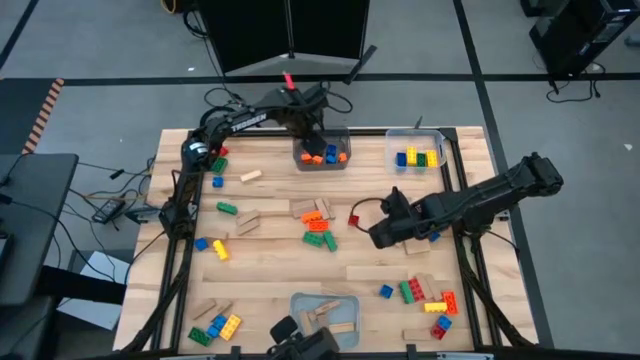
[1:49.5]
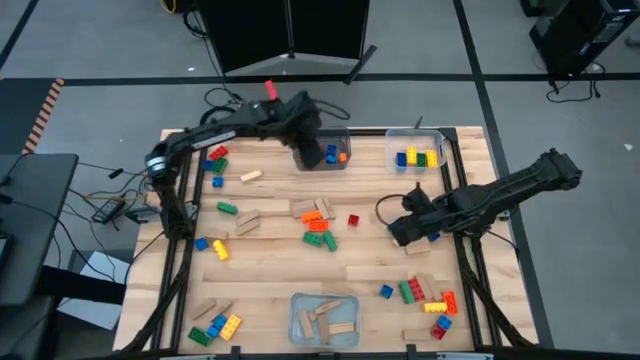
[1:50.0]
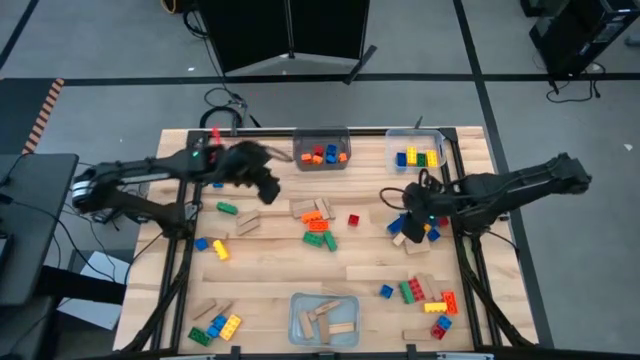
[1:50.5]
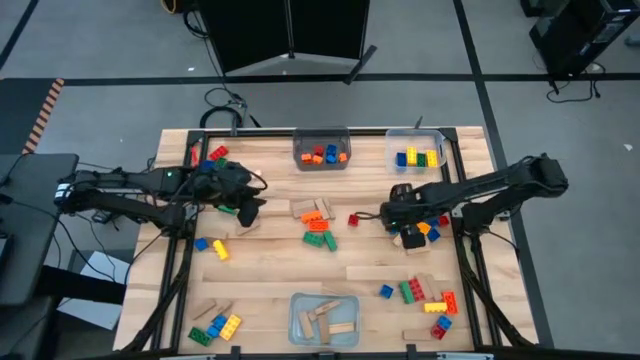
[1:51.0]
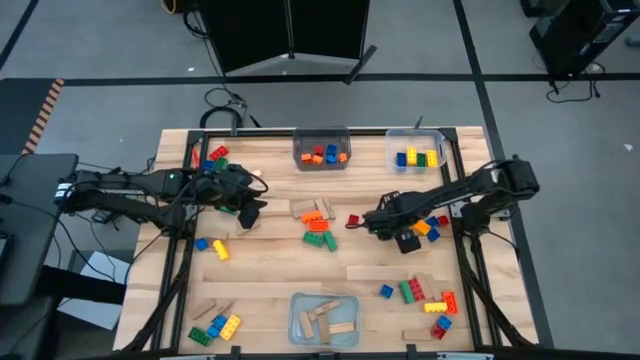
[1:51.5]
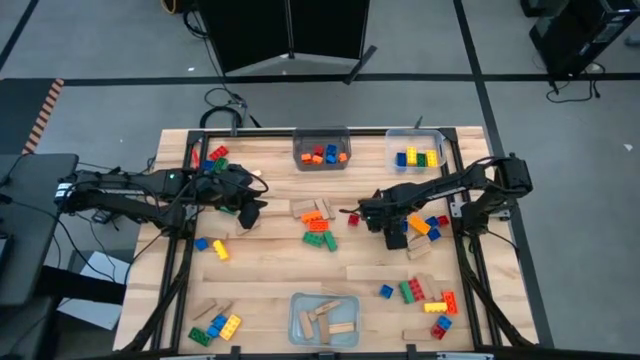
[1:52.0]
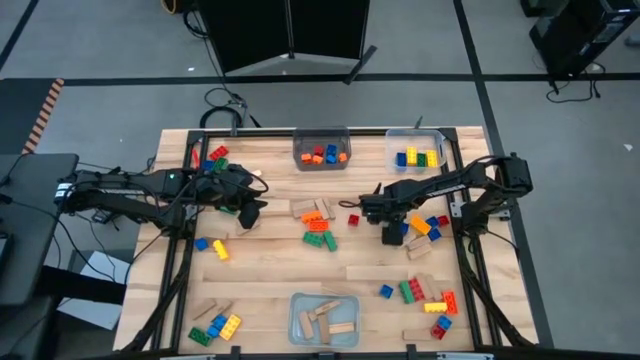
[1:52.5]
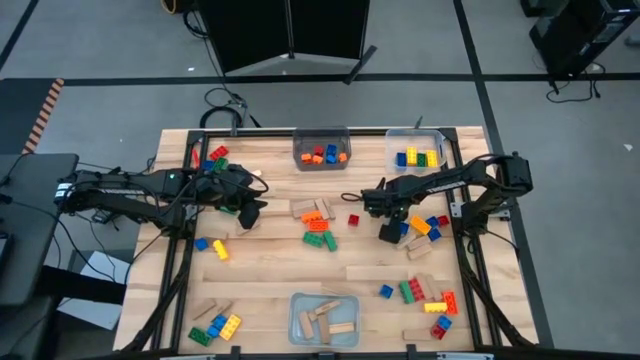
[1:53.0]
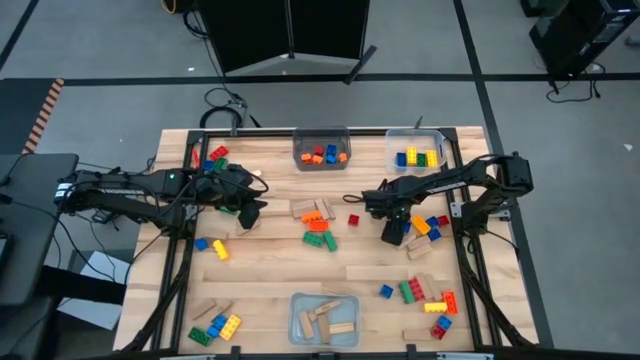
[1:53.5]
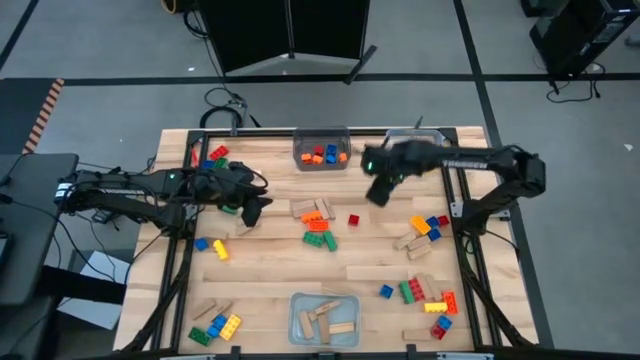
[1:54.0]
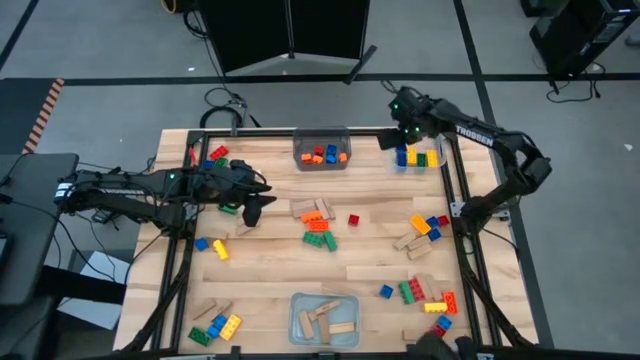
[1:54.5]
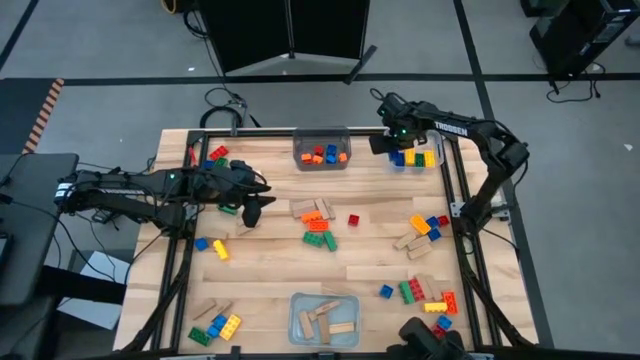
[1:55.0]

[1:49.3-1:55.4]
Task: Sort blocks by size
Put the large blue game piece into the transparent bin

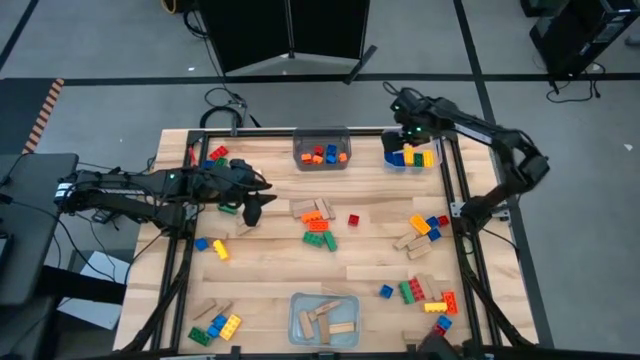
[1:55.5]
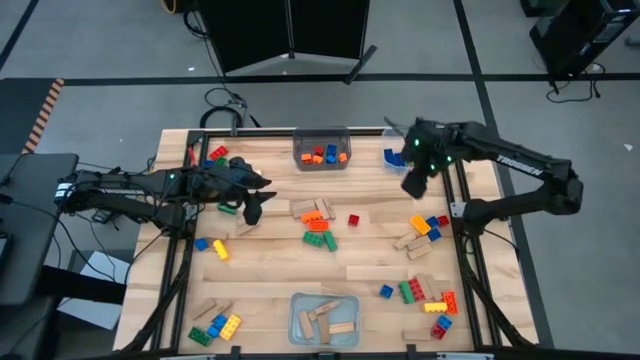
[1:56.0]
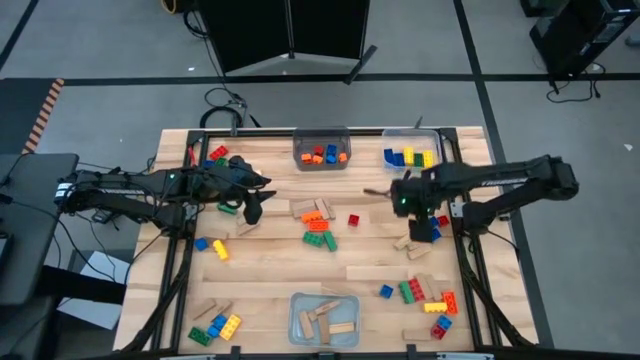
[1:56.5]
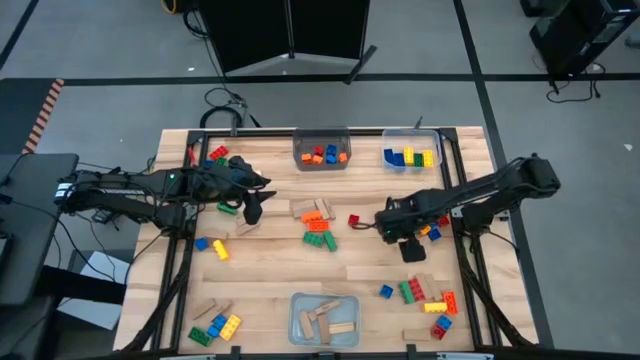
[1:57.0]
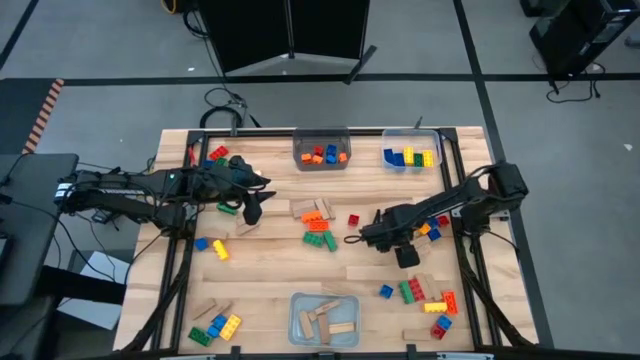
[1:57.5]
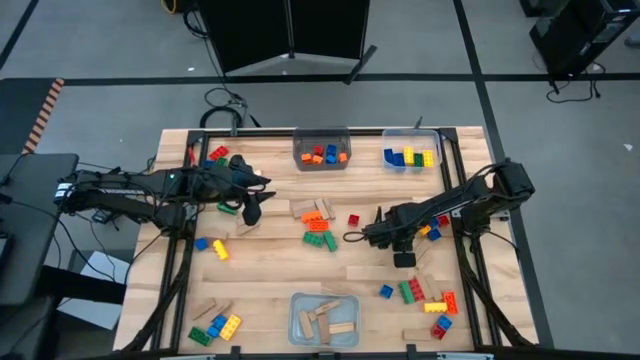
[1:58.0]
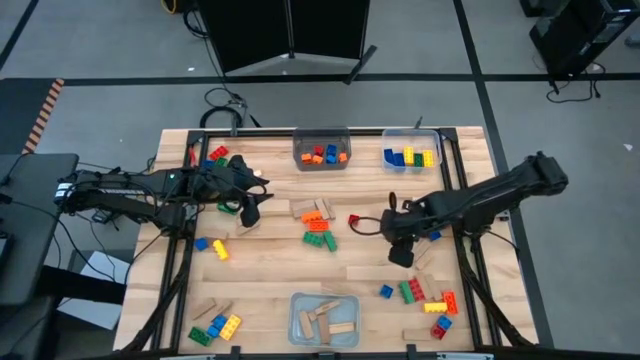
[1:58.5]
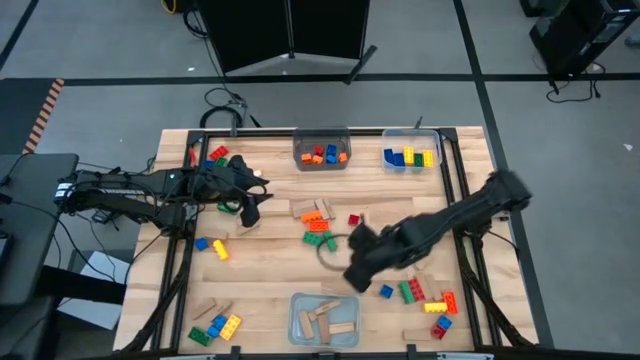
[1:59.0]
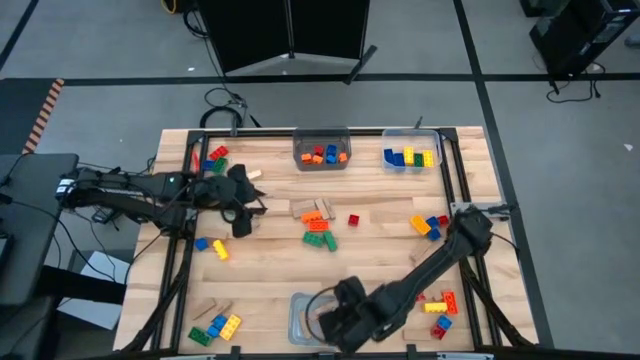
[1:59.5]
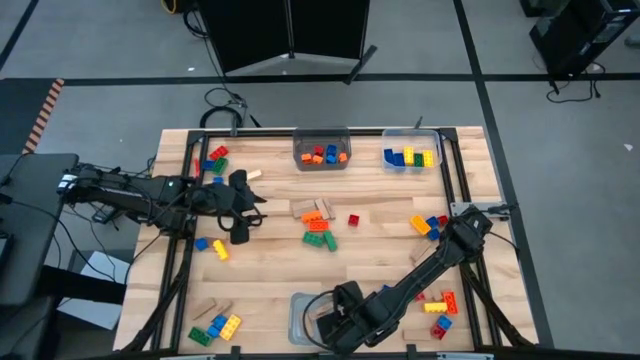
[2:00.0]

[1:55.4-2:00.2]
Put the brown block into the gray bin

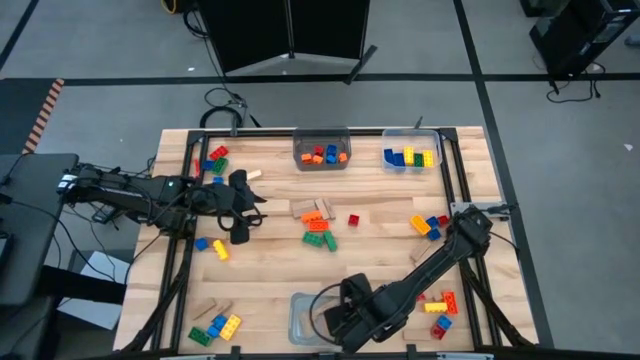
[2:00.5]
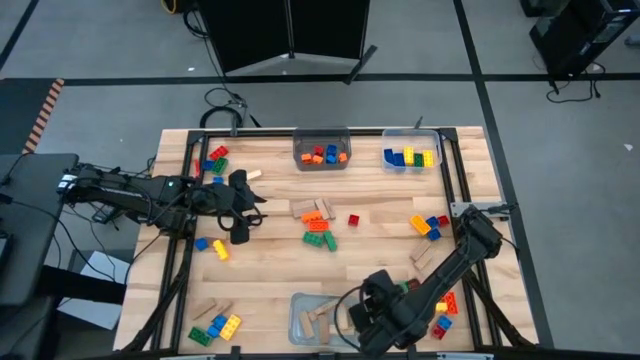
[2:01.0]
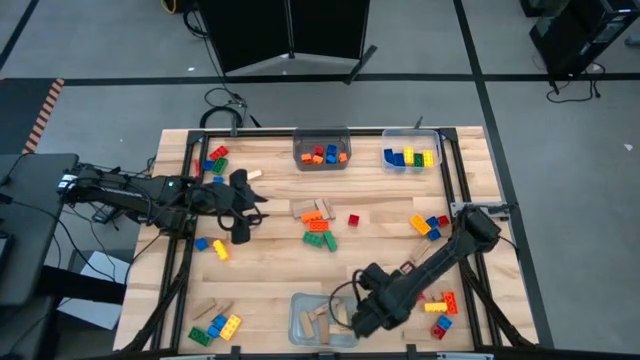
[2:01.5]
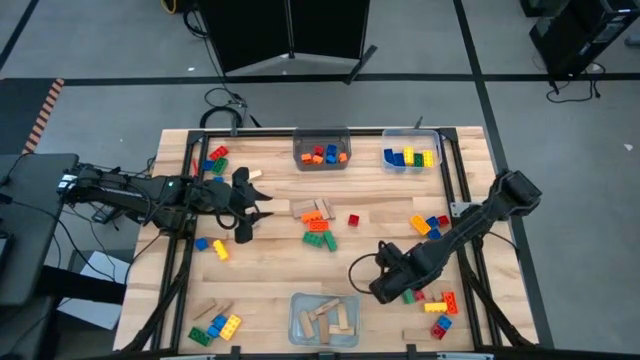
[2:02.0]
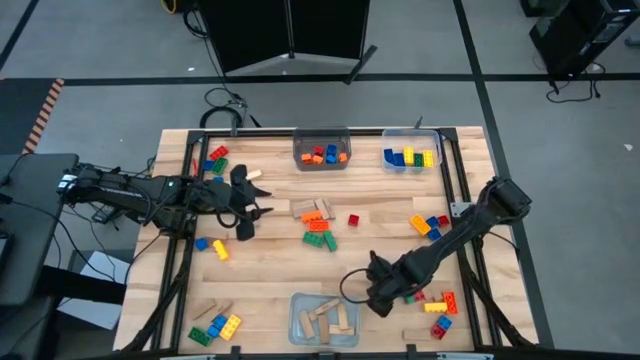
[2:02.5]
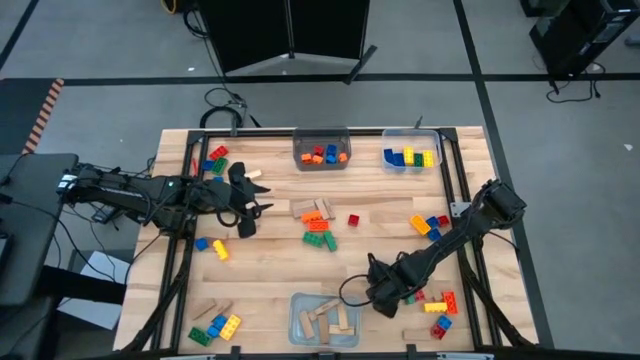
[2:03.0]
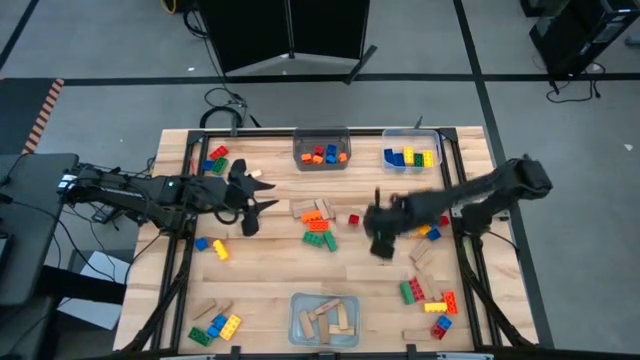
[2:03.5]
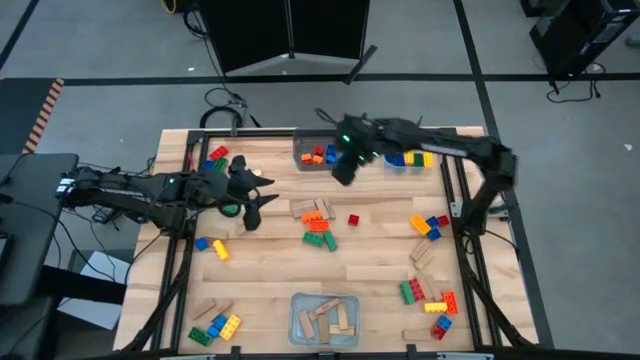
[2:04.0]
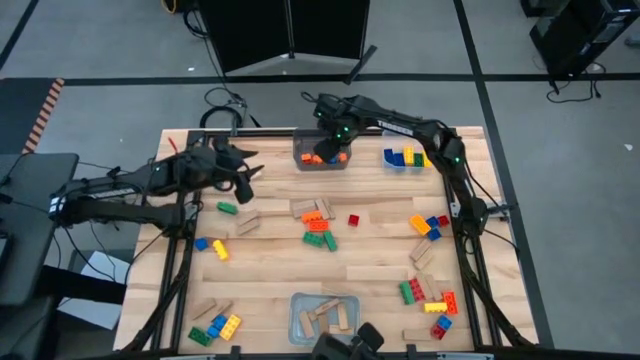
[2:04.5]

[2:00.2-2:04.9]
Put the small blue game piece into the black bin

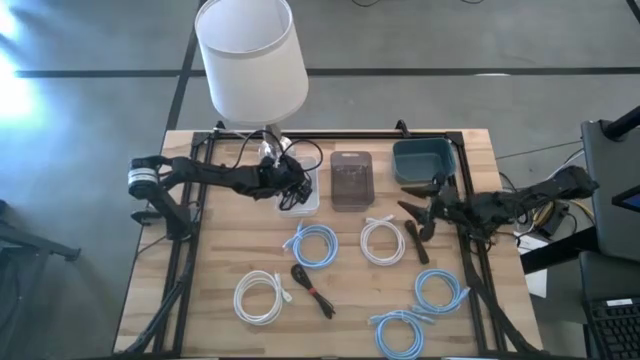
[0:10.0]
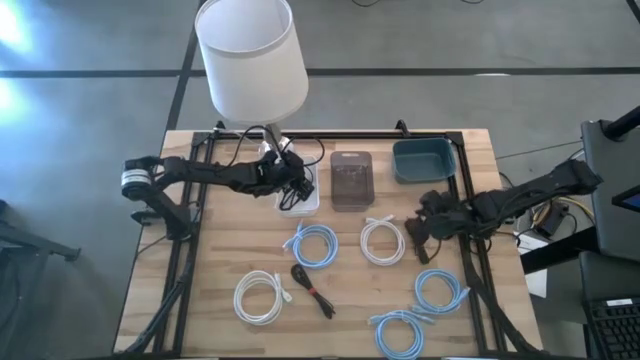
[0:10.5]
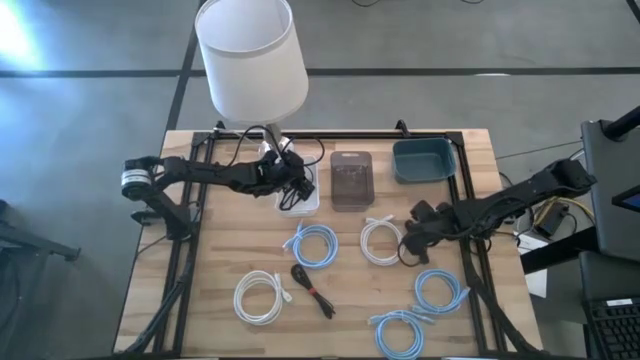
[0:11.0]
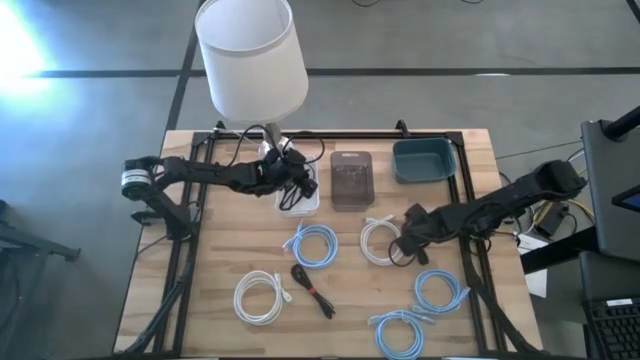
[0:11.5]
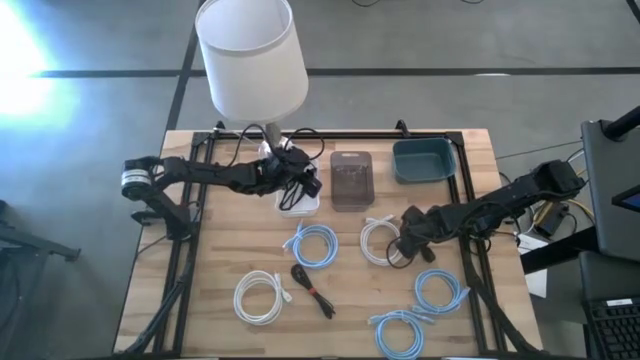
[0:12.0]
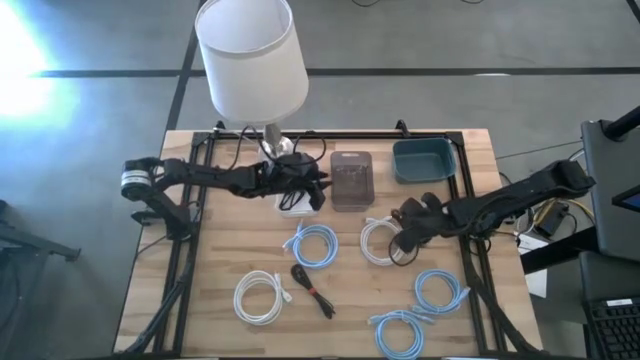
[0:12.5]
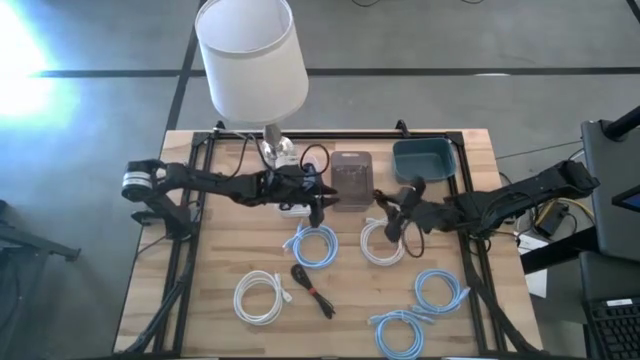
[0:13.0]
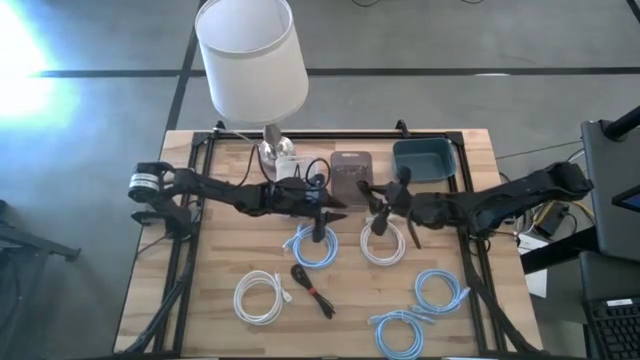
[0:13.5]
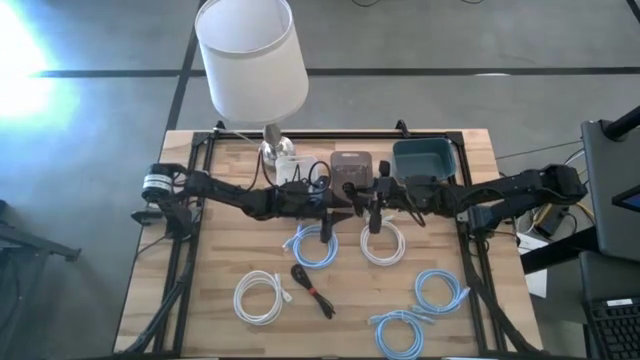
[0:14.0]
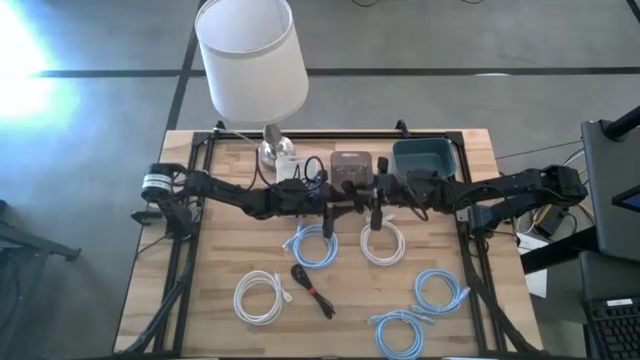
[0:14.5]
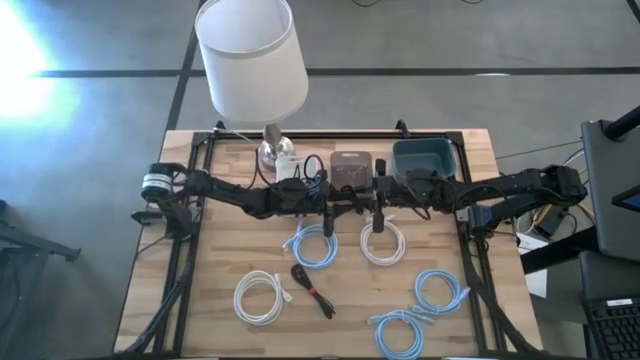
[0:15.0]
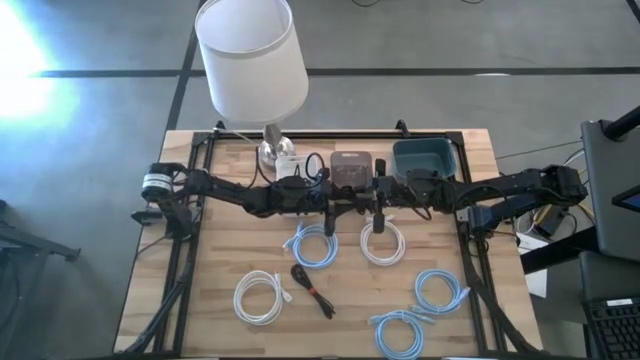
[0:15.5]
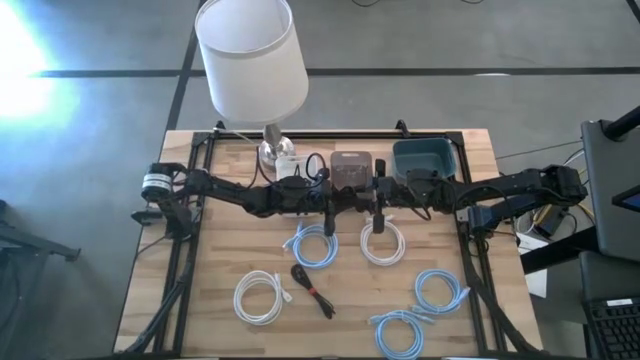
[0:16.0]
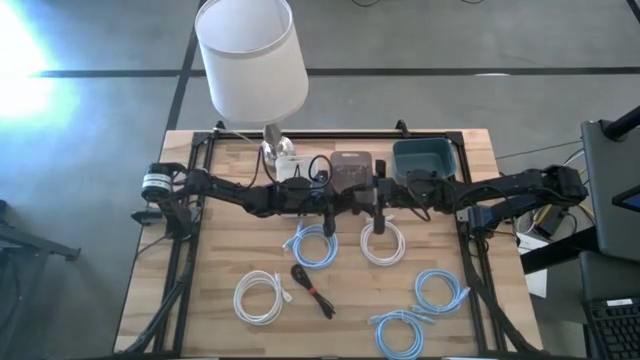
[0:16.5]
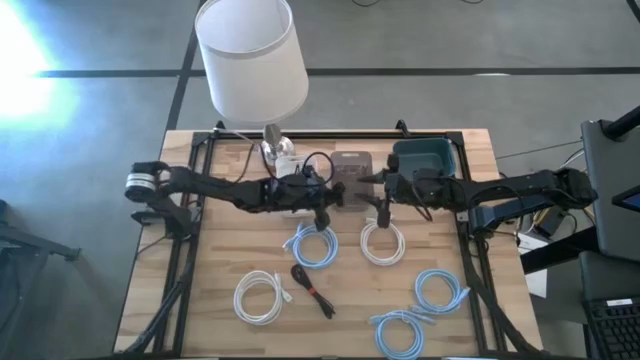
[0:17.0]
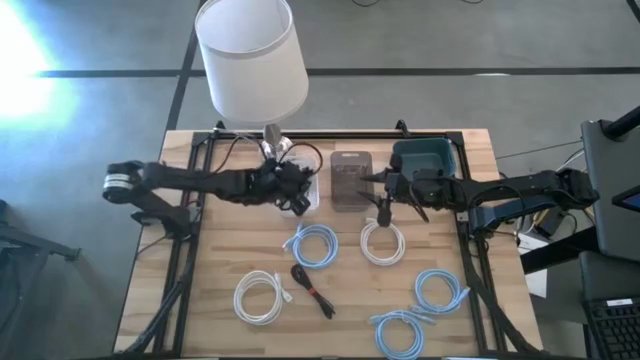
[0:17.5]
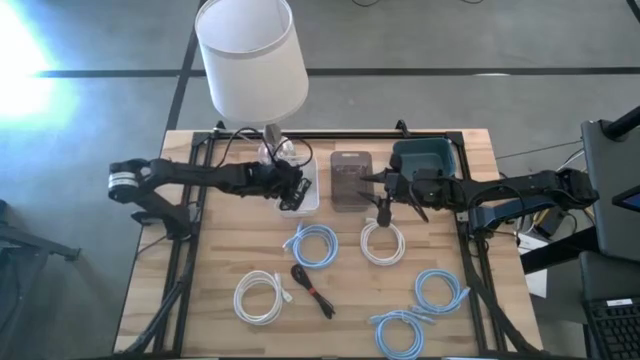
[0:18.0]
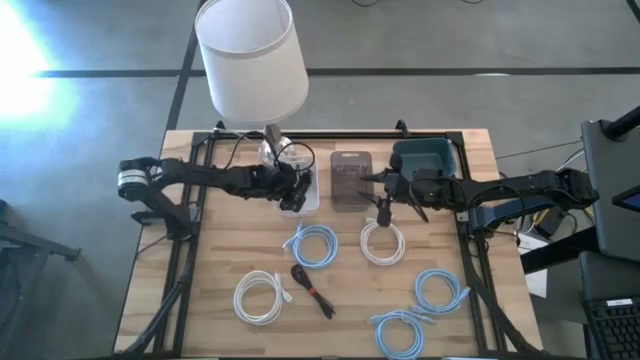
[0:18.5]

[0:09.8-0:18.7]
Task: Pick & Place USB Port
Put the right black charger cable into the white bin
